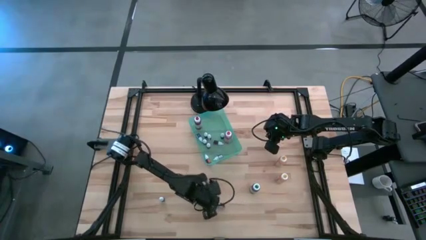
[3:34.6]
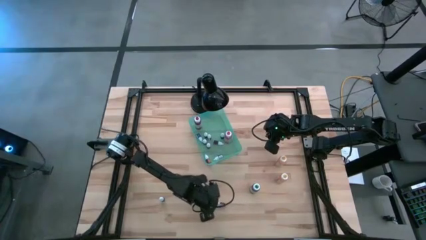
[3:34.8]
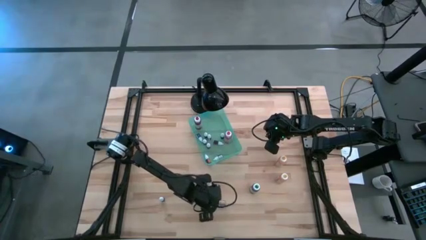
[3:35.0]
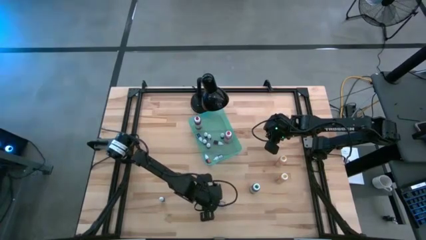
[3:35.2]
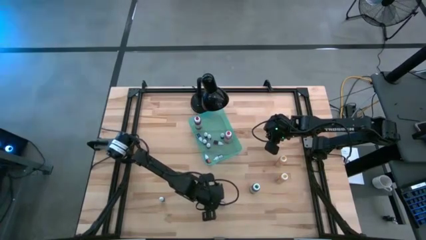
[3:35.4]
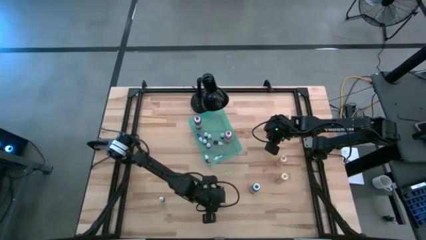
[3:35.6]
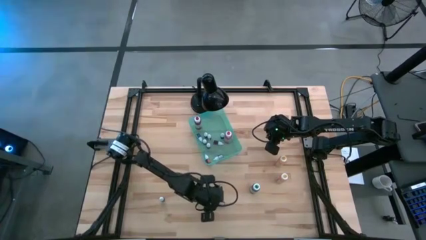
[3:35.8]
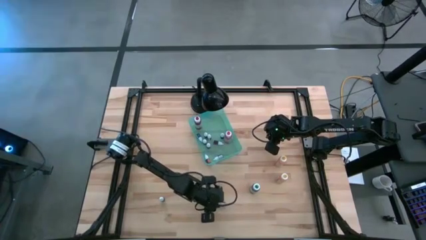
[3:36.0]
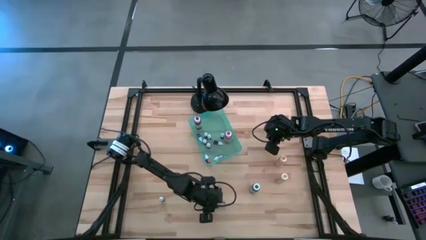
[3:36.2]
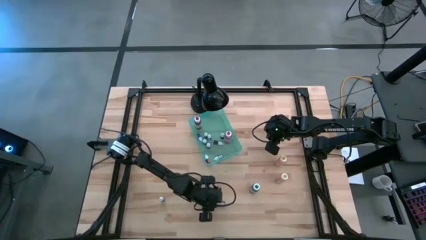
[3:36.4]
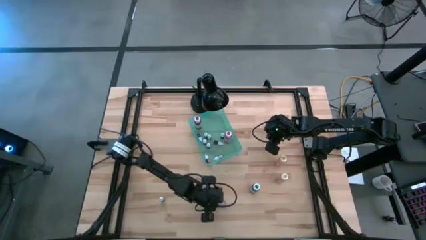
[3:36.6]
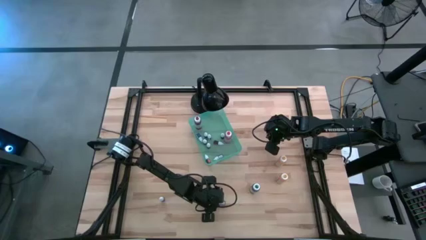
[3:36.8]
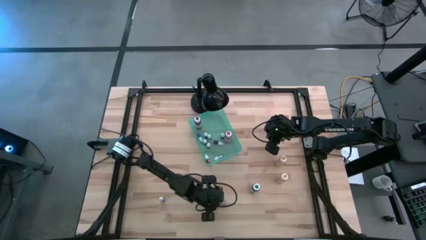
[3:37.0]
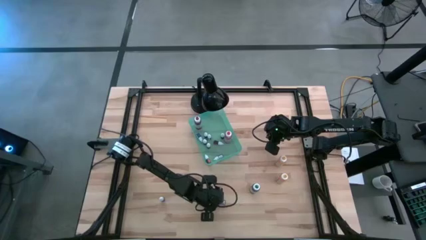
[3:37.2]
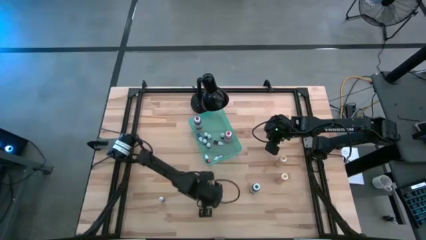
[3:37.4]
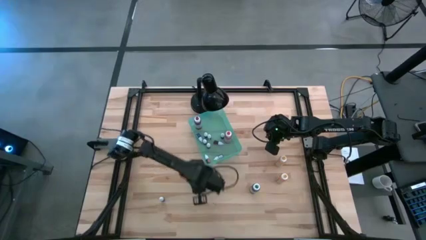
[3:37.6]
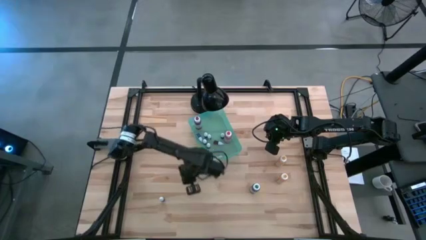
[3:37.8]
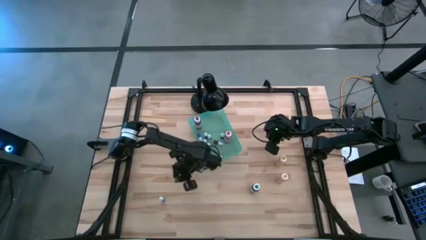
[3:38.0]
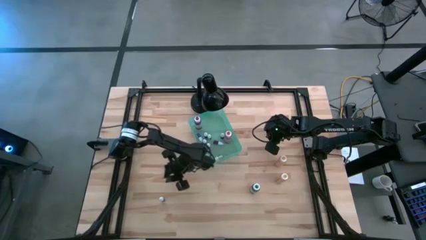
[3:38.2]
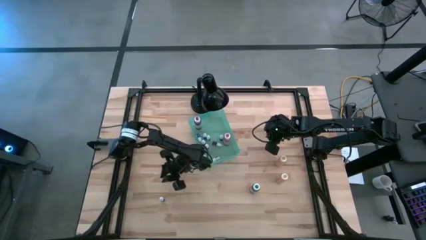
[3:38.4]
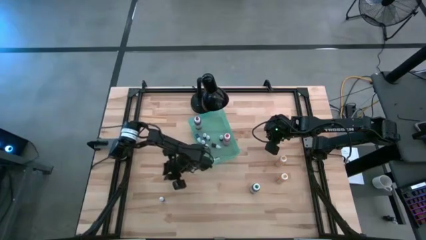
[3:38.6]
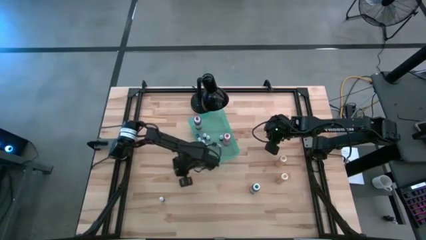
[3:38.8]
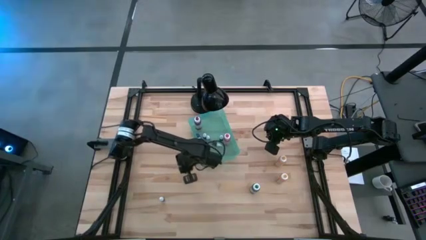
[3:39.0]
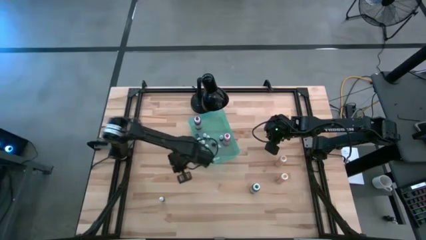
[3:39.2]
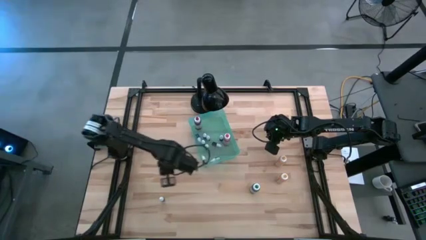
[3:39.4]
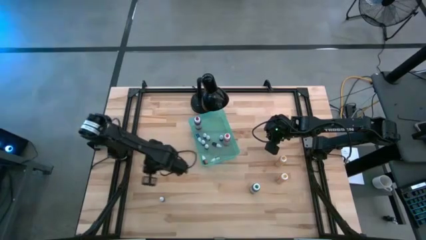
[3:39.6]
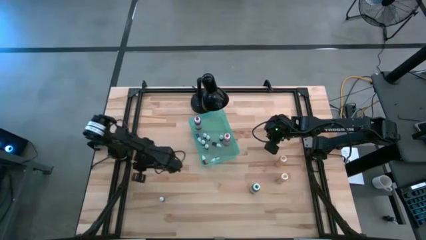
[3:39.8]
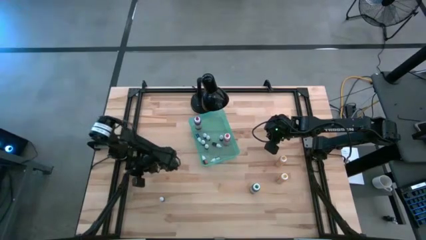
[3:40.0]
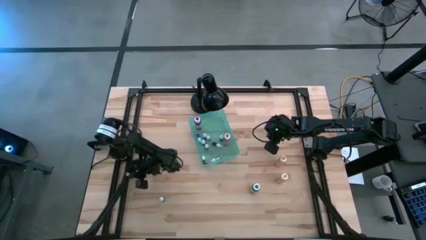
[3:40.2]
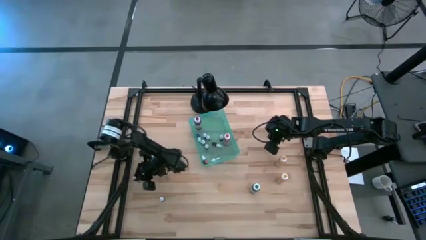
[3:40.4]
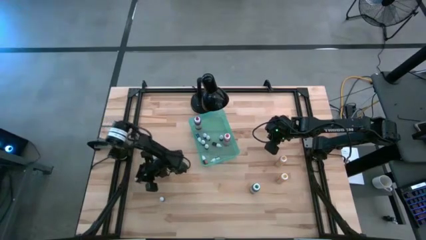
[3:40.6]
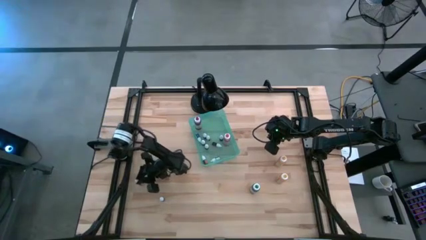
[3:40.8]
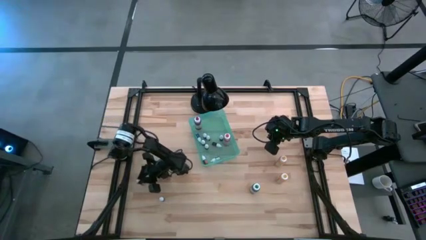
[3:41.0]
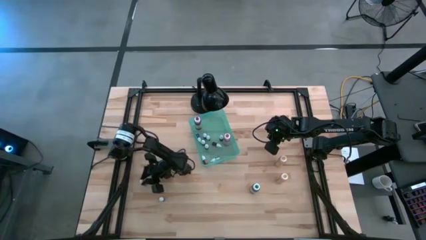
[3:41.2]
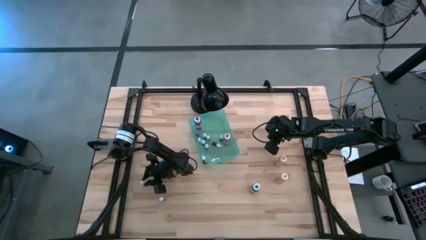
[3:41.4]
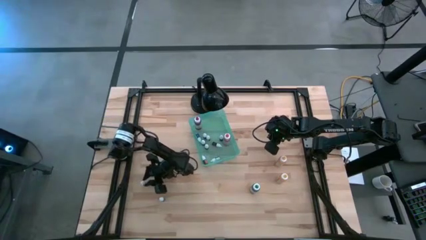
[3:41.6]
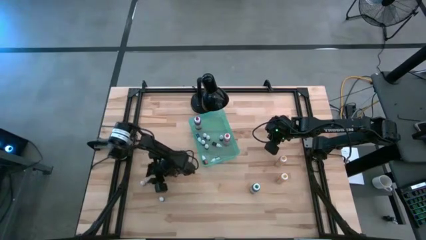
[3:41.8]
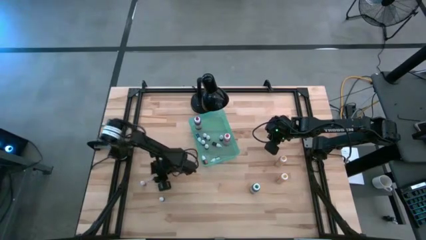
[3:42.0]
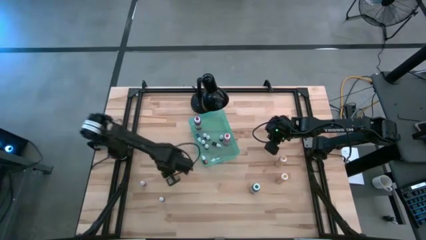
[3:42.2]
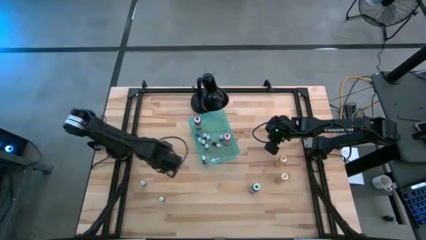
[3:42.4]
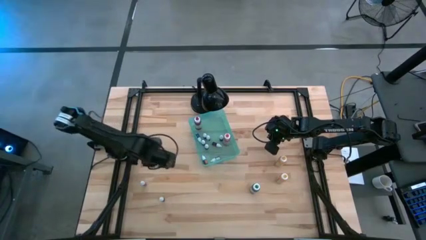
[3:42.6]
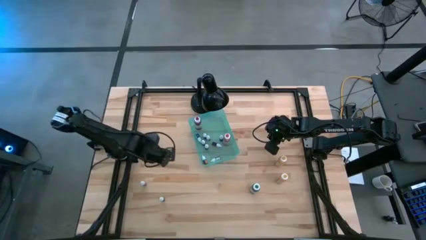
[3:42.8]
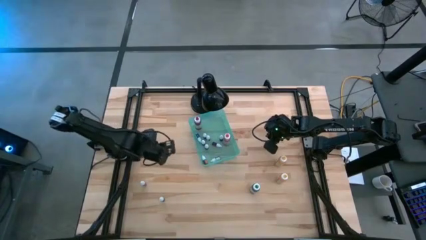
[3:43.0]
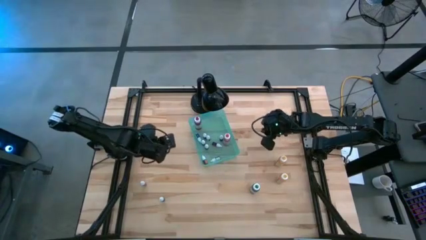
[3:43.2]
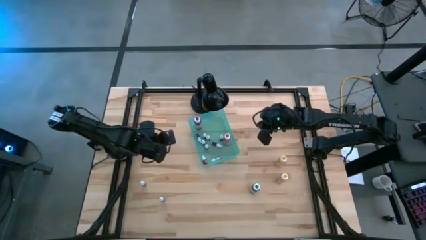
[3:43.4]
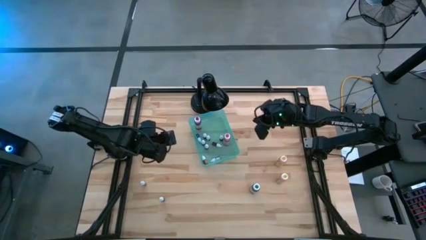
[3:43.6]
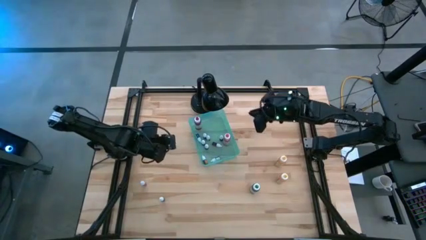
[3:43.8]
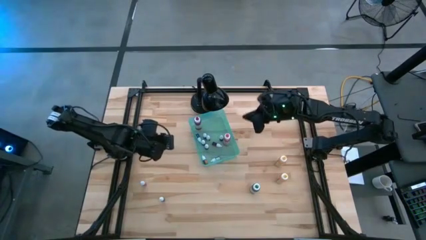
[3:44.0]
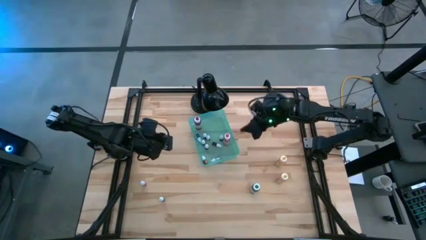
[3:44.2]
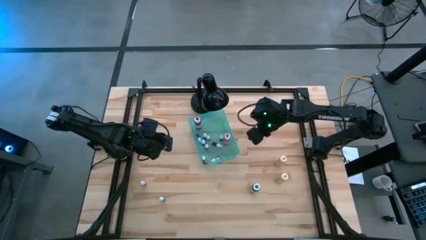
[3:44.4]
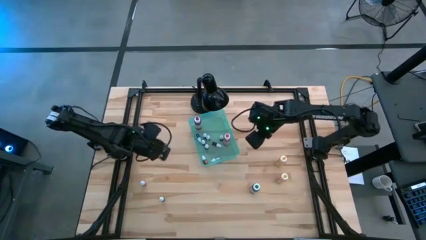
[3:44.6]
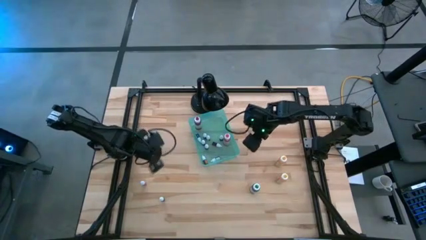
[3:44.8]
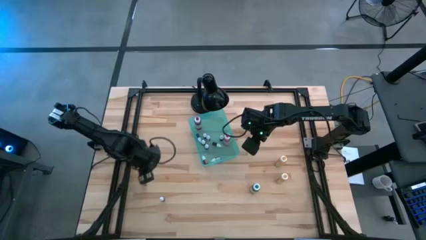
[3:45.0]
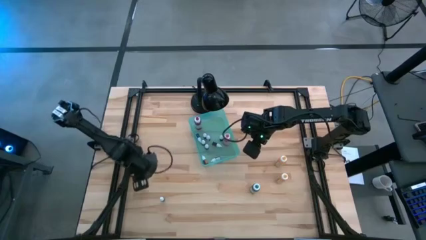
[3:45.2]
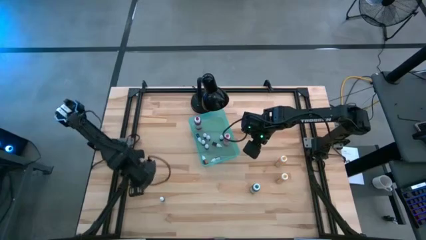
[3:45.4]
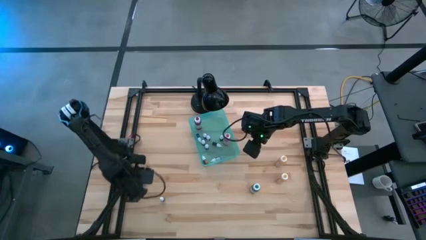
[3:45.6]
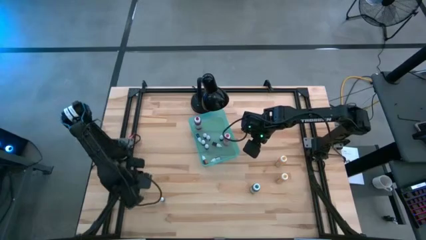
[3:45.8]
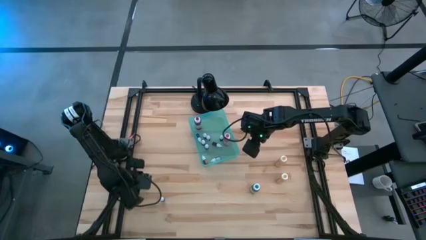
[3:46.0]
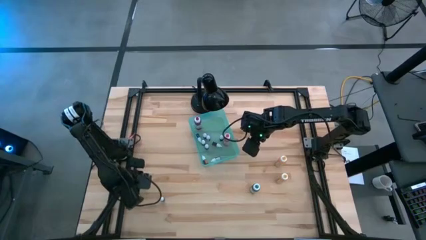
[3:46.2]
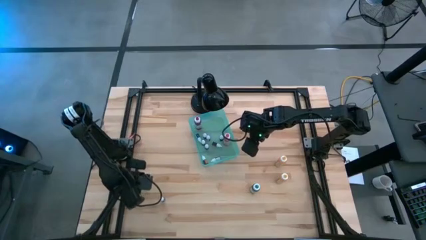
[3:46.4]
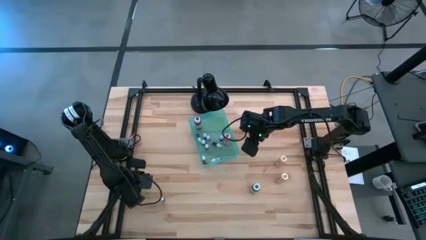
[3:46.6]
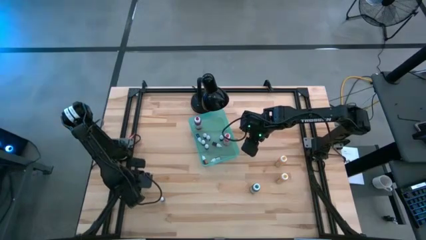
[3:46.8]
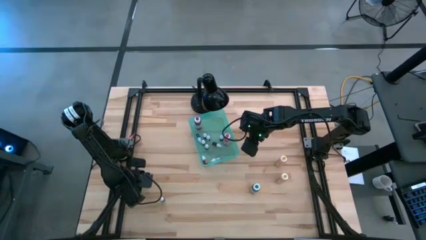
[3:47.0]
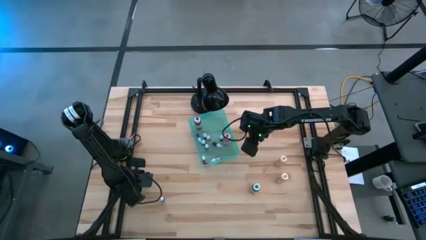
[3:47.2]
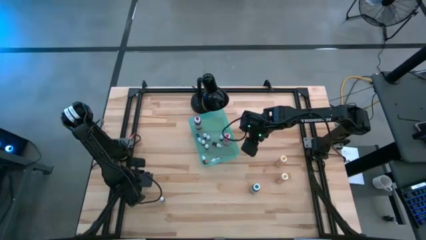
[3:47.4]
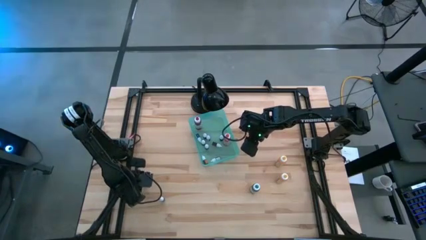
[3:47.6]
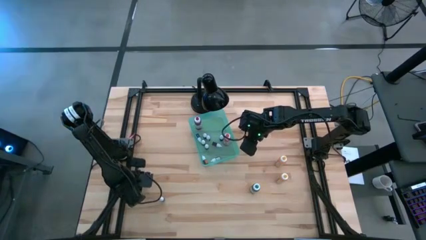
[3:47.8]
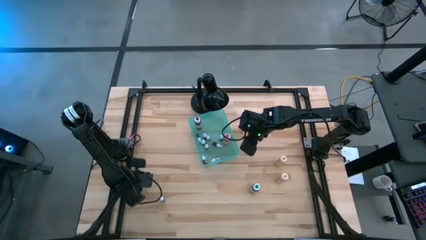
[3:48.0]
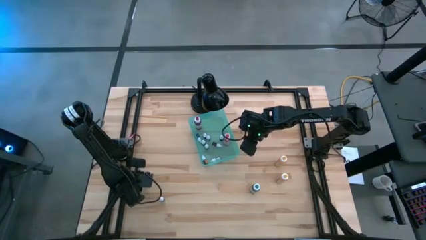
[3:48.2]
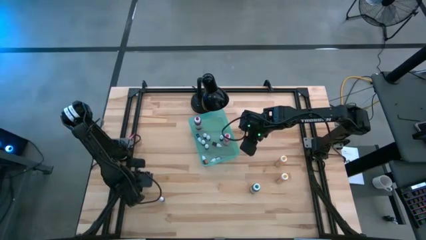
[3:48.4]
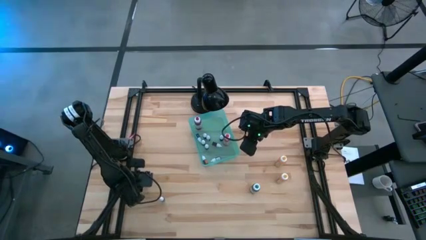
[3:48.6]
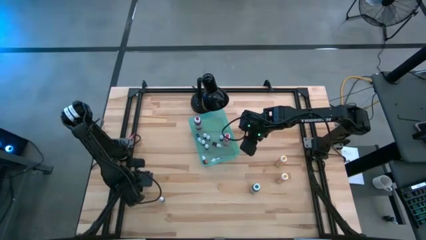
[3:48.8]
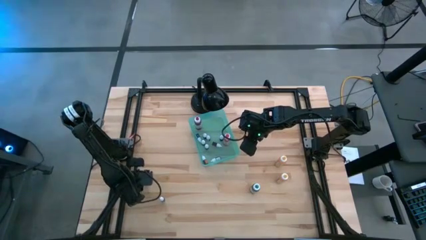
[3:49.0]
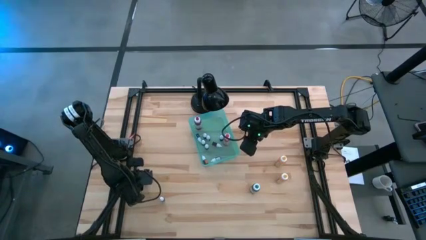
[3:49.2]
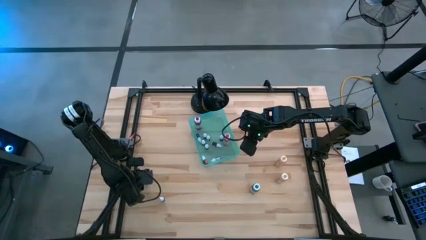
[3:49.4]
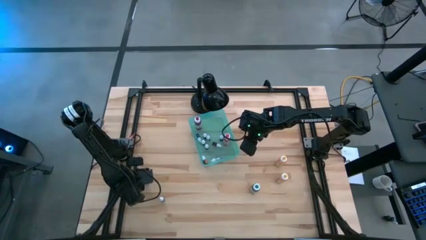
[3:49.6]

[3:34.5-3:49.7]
Task: Pick & Place food coloring
Put the small pink food coloring bottle into the green bin

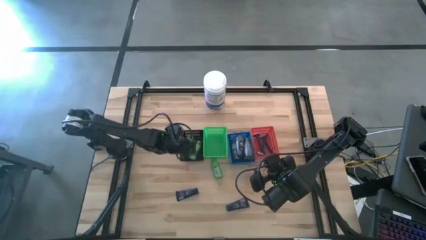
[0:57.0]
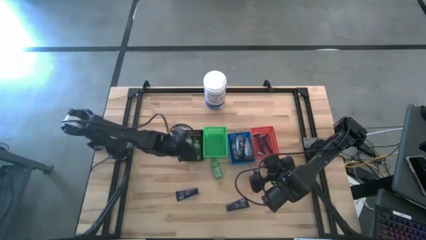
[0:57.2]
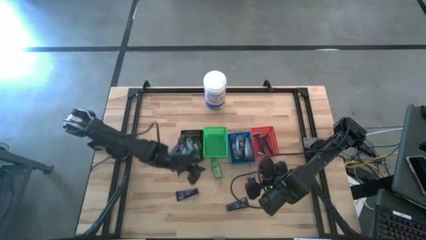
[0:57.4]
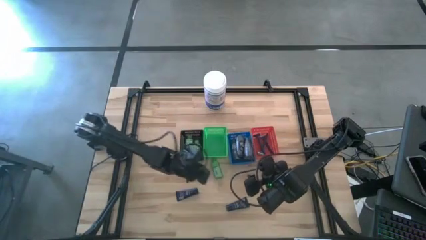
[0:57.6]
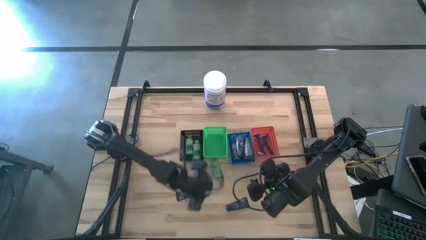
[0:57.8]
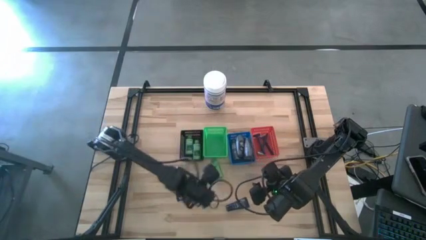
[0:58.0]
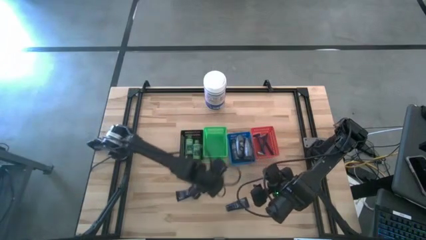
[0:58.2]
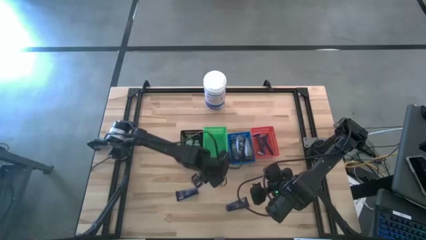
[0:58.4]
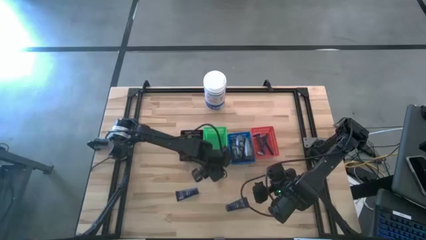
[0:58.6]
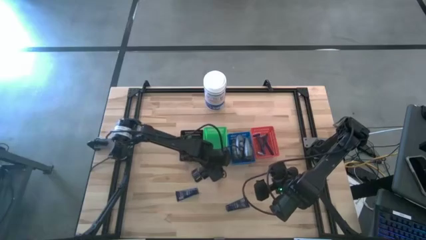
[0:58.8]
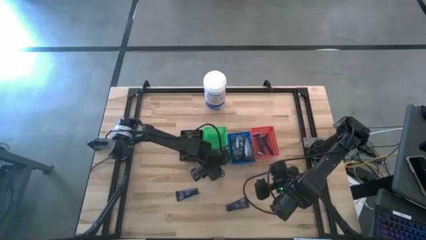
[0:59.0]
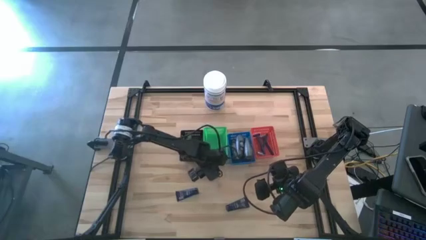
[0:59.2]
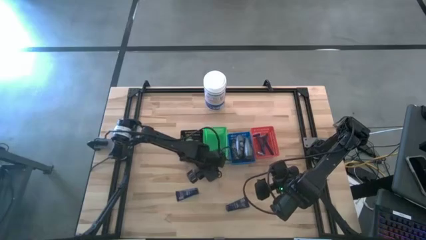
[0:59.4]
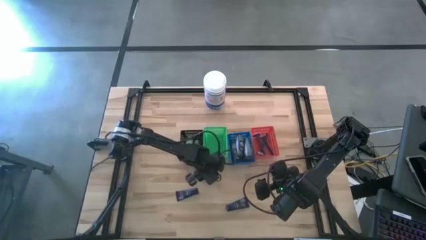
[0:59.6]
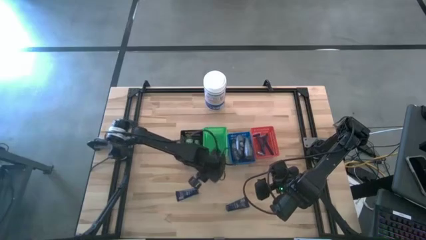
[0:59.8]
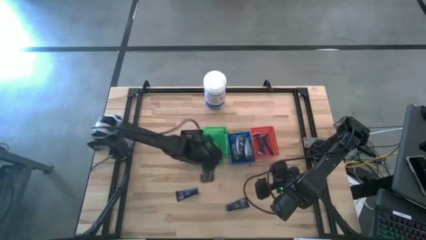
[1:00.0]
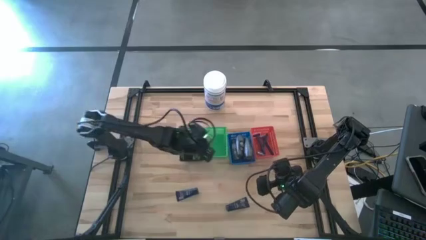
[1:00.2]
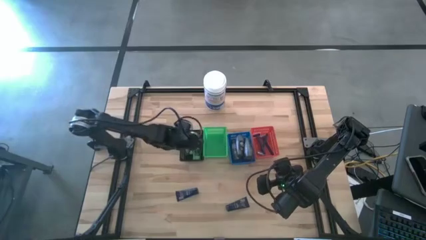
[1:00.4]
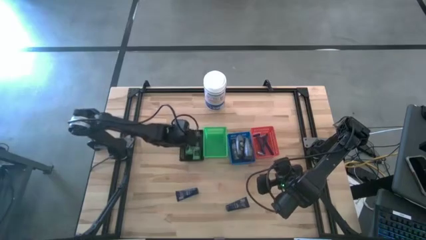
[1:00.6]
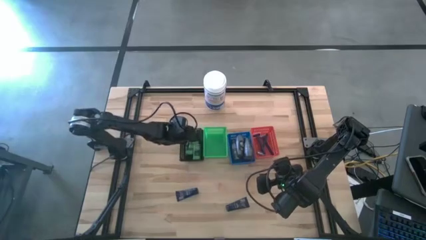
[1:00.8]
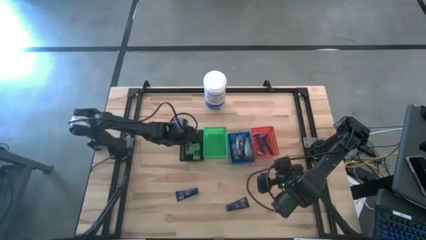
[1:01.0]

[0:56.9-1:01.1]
Task: Pick & Place Travel size toiletries
Put the shampoo into the black basket
